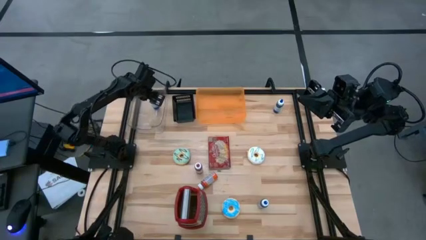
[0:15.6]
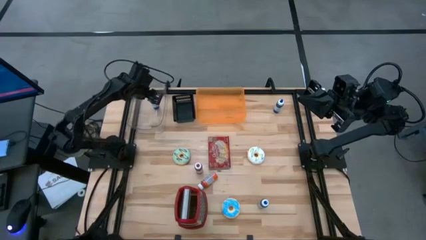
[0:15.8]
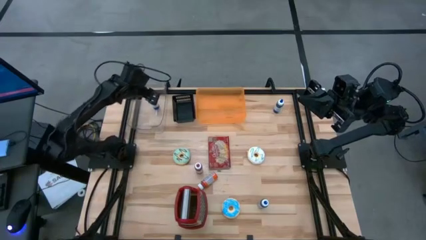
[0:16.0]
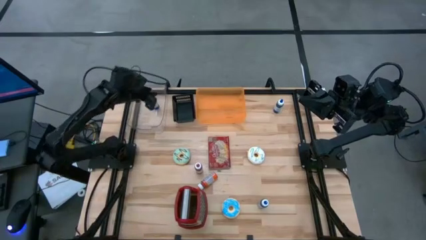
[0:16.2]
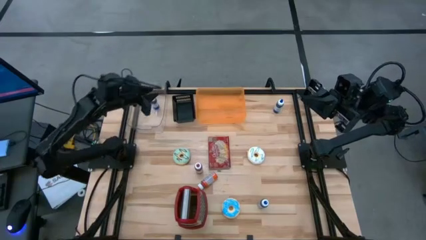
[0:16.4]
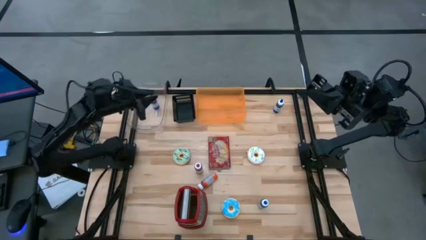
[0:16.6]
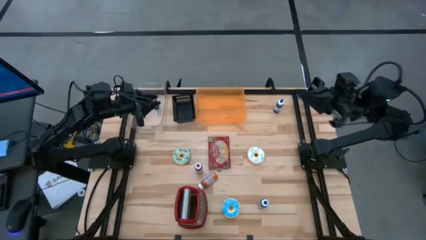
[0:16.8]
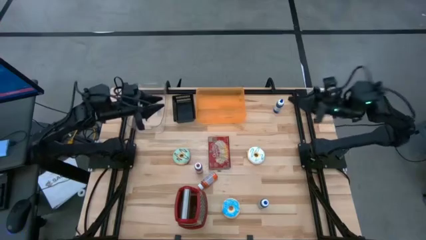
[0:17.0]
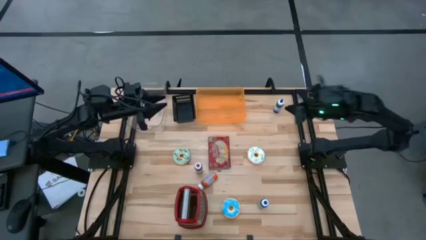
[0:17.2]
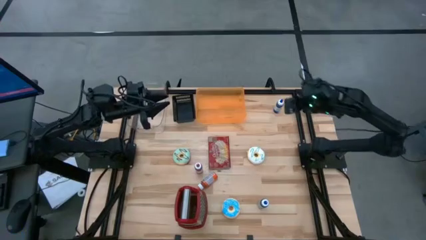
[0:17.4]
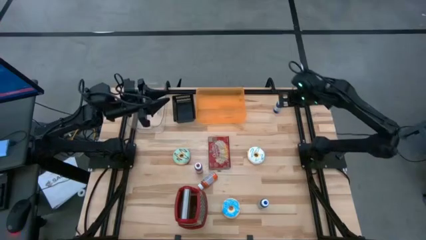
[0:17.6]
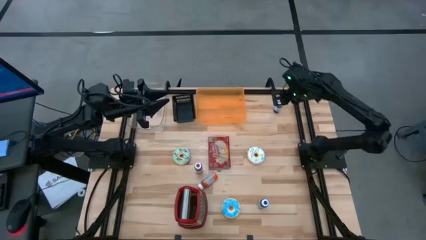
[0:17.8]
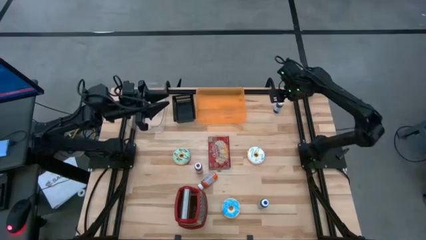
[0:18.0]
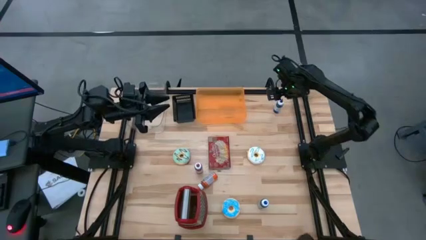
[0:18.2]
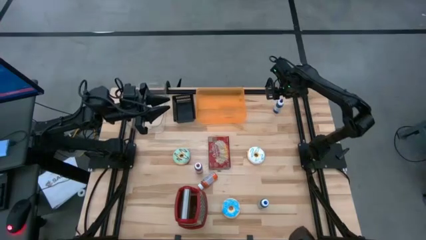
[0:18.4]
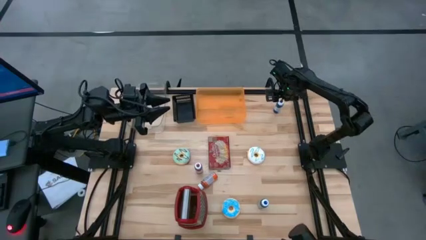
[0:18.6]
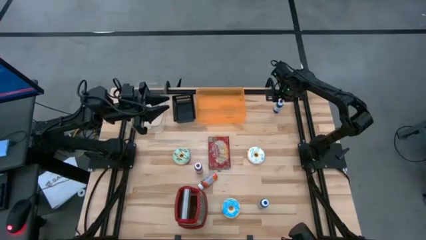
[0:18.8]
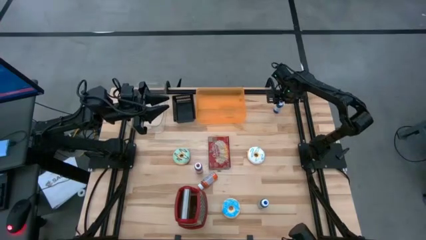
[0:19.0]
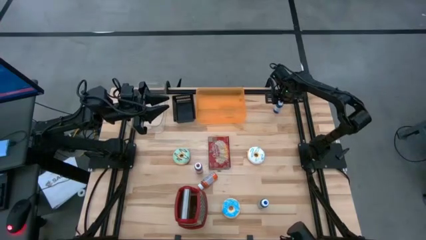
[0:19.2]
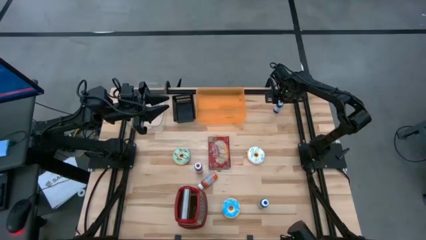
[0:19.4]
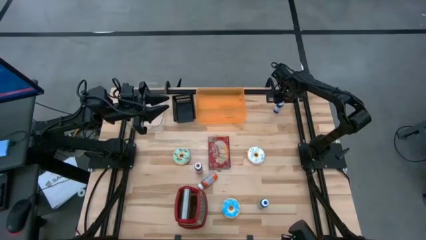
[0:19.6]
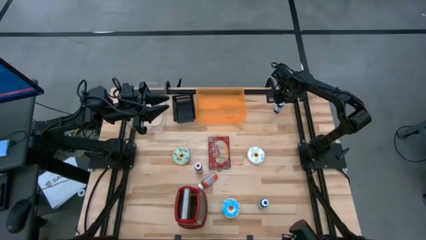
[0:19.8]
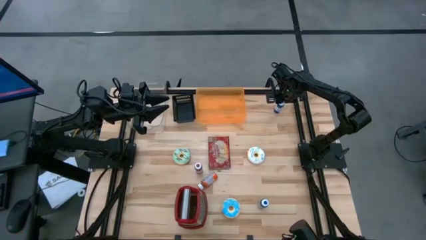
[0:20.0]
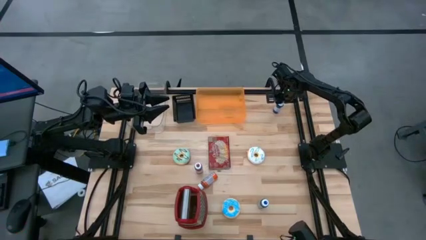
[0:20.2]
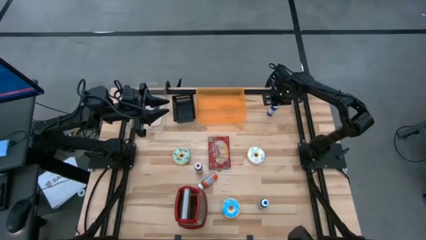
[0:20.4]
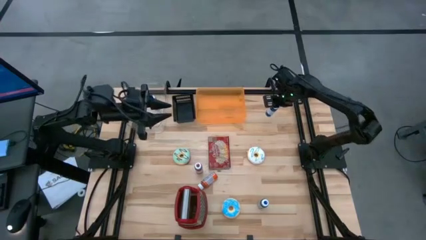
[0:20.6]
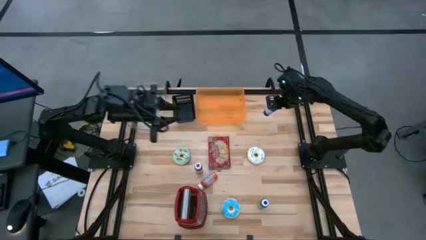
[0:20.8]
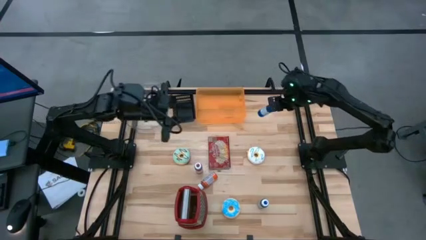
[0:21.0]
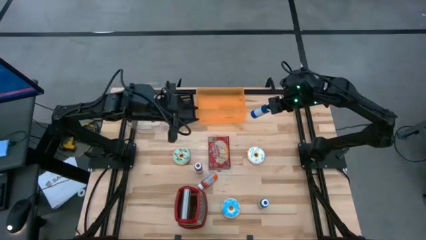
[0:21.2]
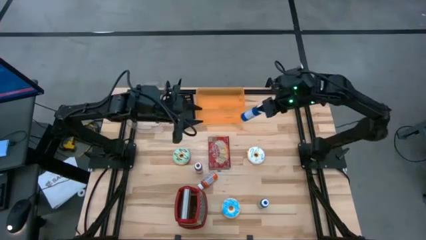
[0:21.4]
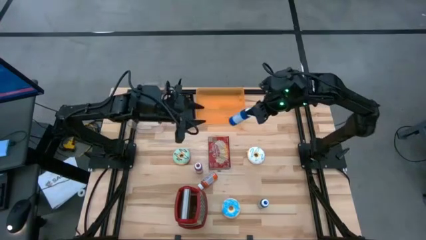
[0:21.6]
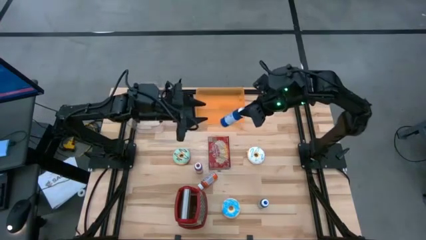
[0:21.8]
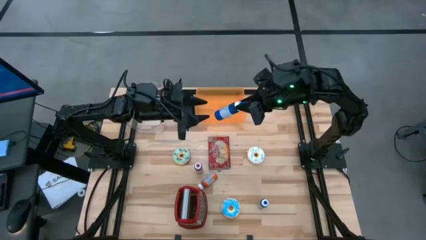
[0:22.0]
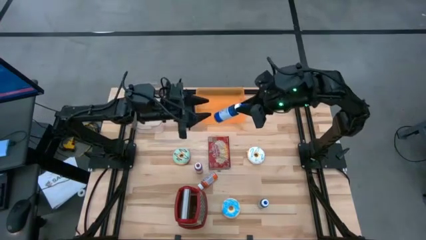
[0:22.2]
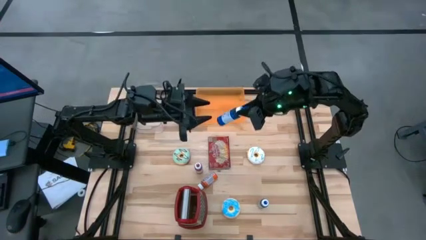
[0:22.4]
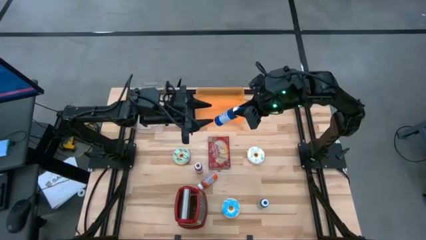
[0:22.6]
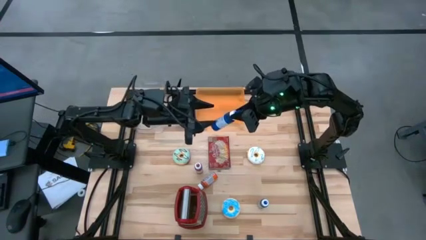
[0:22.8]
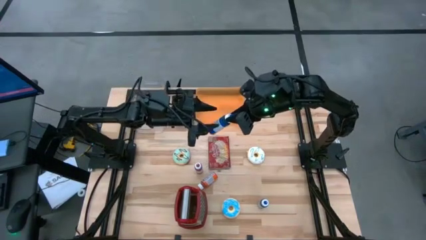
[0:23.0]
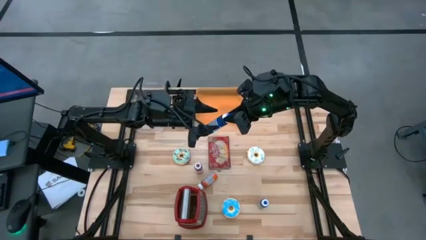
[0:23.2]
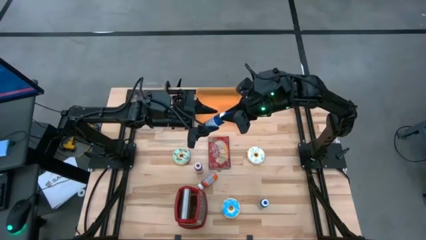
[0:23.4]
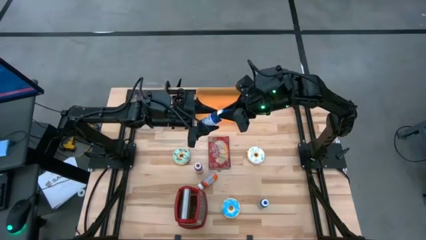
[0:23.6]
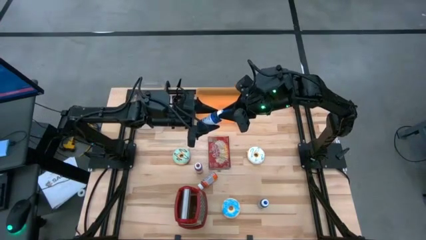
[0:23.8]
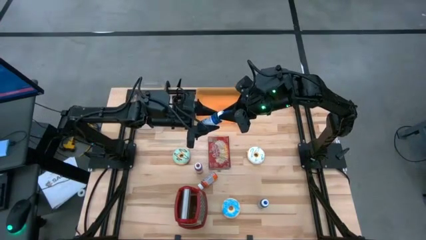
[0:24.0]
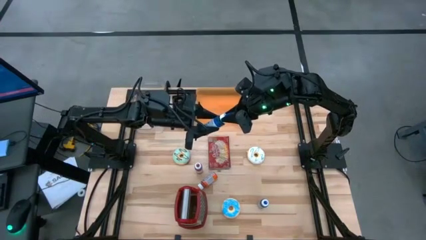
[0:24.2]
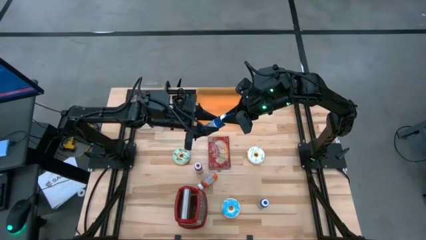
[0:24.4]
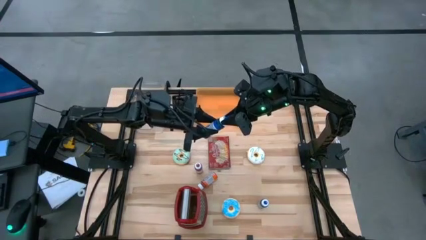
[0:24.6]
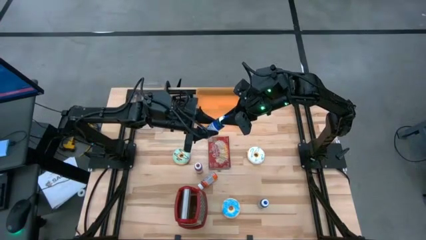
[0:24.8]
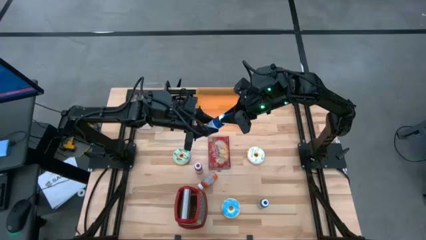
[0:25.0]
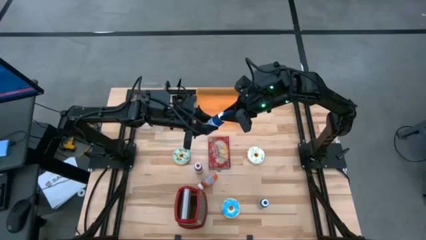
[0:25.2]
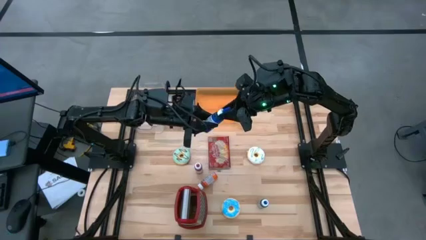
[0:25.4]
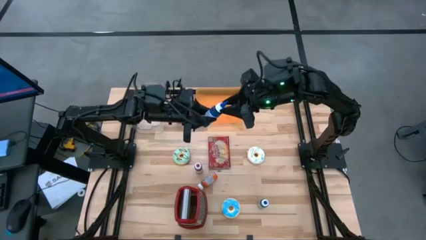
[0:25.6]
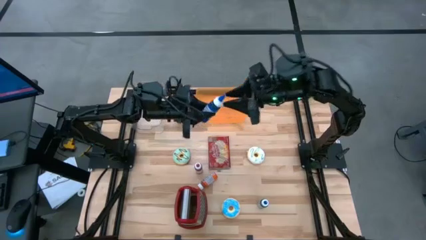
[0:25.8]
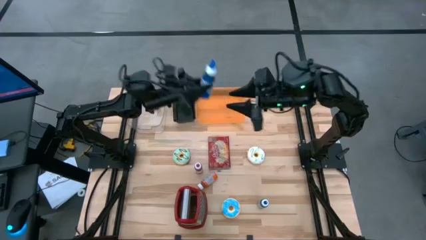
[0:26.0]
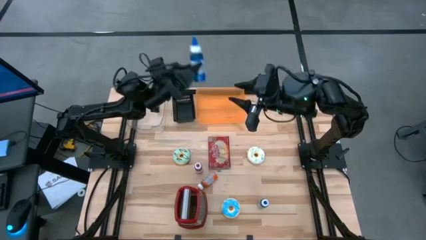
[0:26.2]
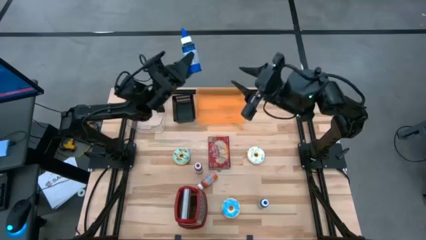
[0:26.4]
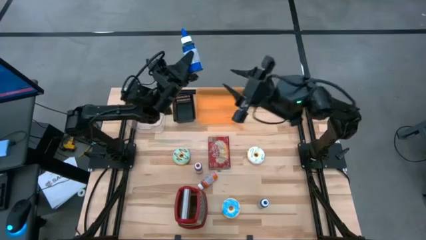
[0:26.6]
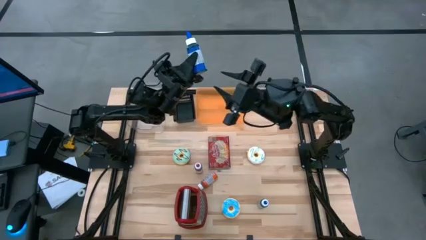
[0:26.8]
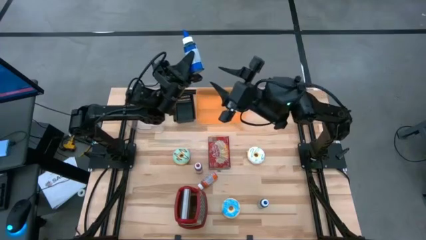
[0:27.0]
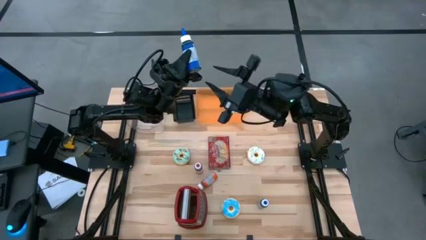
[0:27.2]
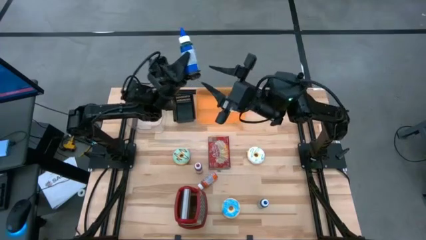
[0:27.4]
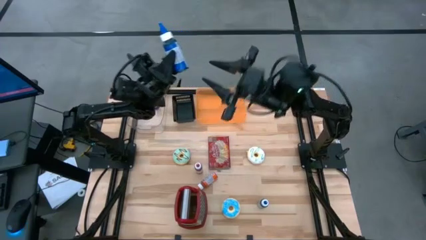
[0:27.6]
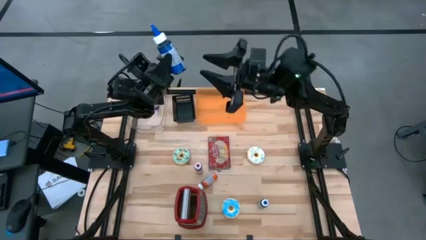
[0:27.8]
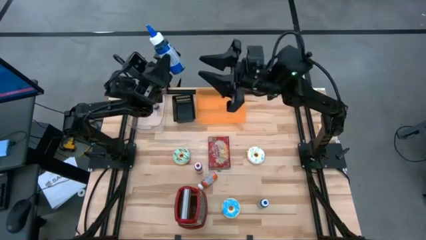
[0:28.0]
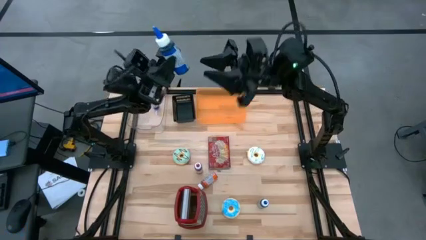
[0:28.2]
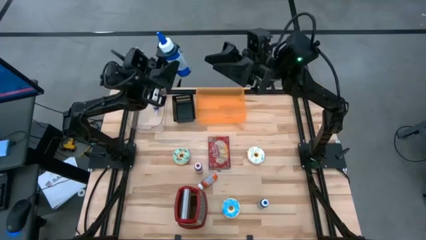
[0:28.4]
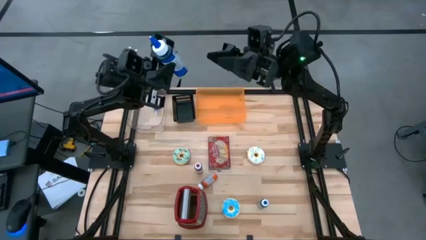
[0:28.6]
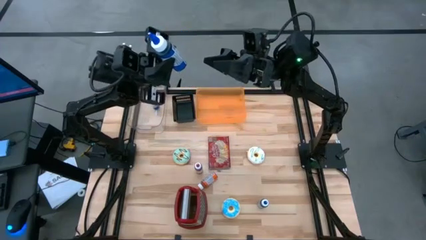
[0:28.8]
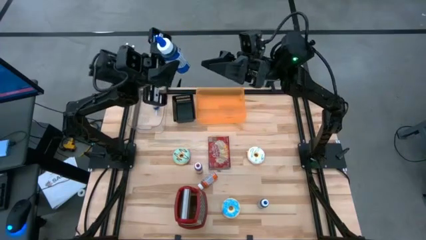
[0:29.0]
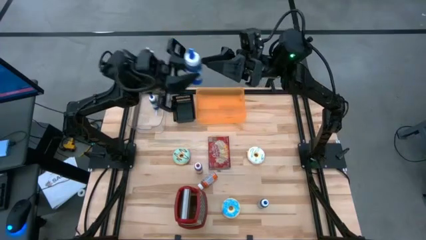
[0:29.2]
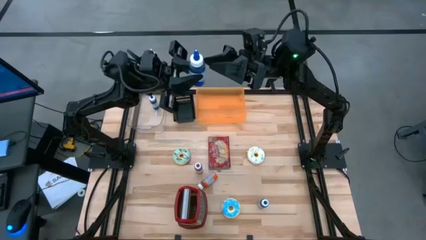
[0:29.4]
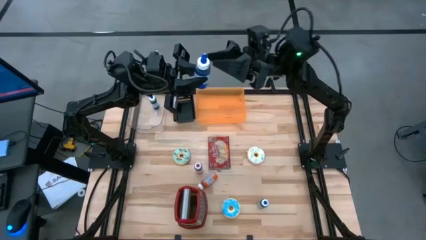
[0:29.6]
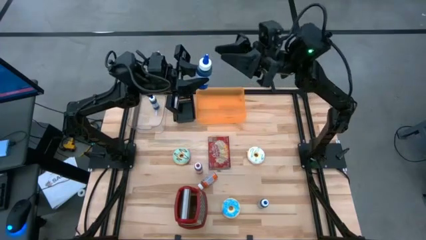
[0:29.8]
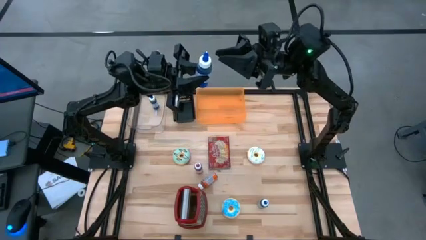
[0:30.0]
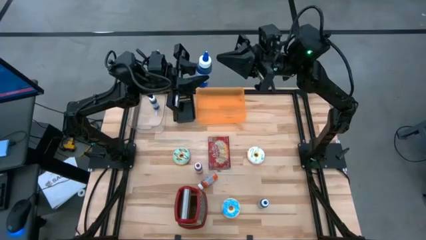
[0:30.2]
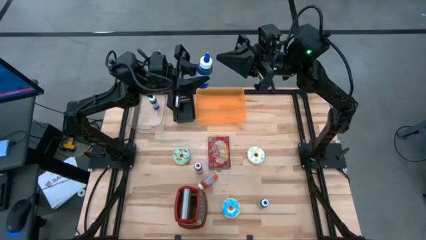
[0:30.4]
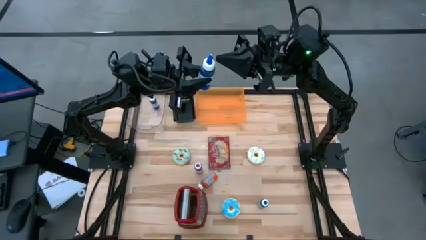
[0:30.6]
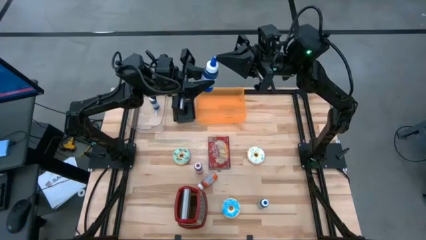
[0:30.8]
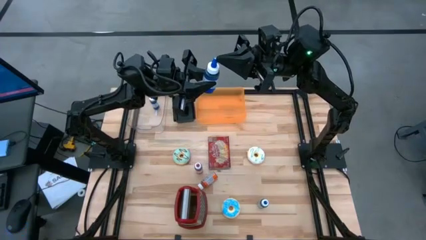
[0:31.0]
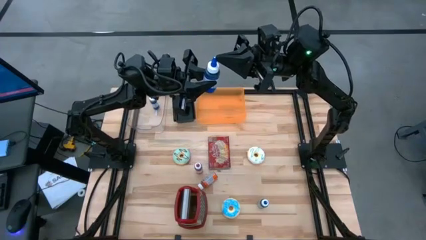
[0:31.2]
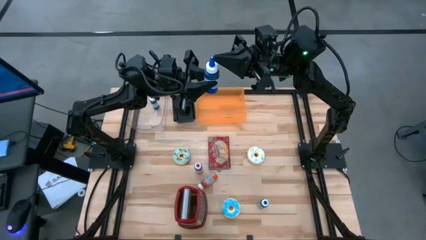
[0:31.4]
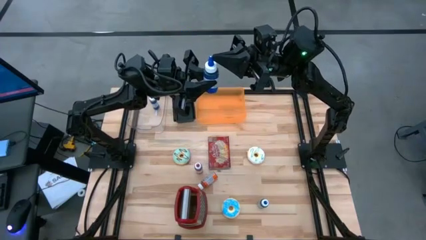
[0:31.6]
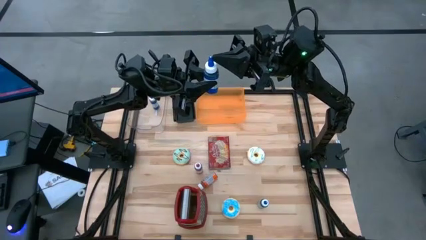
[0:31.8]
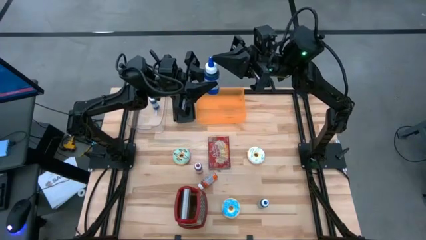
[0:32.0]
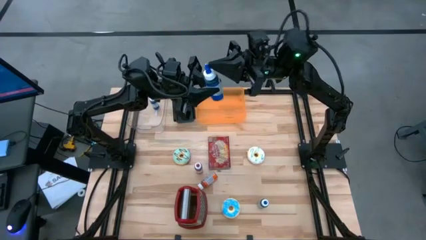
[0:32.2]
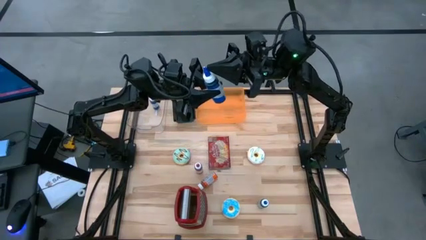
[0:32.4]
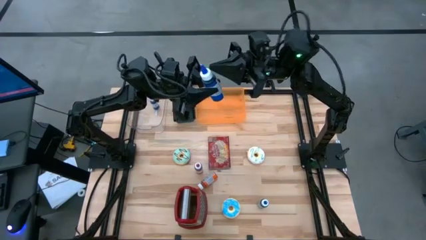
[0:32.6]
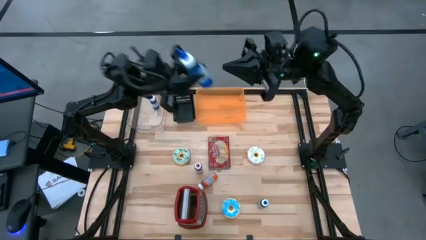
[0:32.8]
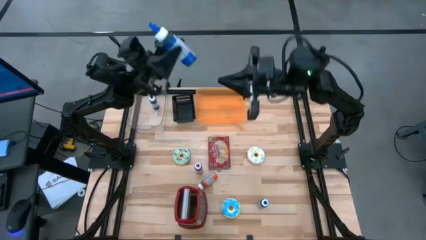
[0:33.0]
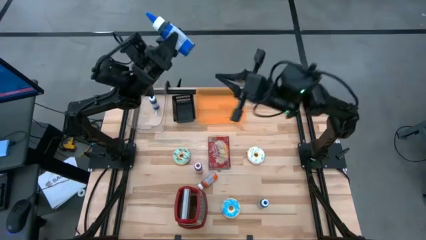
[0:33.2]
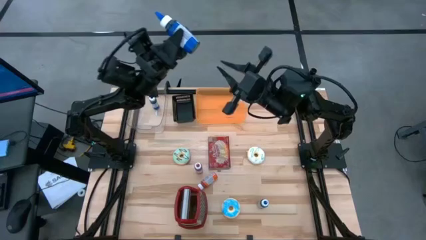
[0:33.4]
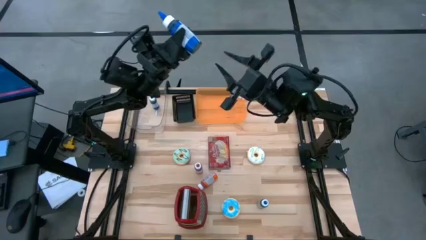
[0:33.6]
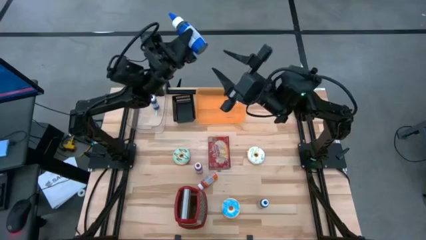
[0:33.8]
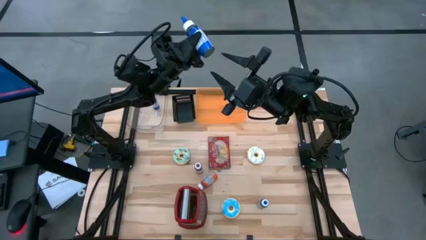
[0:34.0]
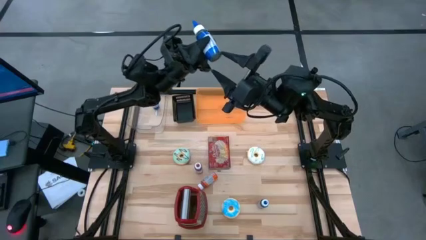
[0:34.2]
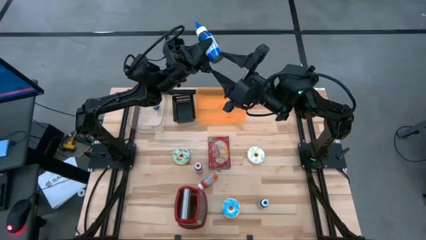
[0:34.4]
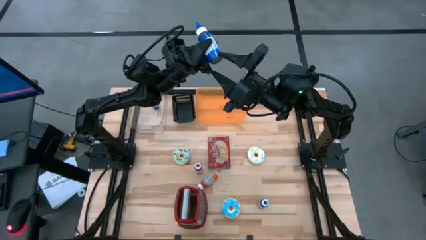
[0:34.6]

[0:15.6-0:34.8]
Put the top blue food coloring bottle into the transparent bin
